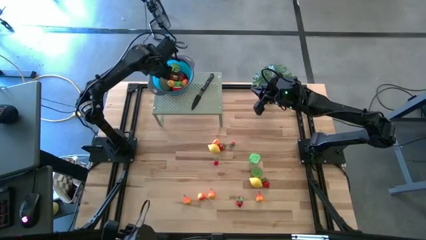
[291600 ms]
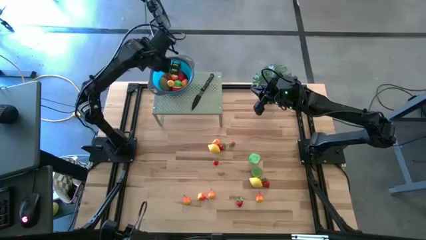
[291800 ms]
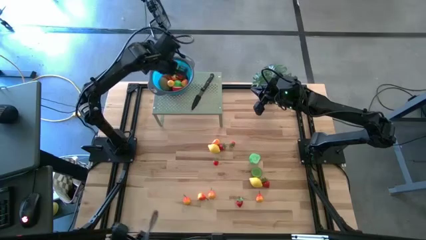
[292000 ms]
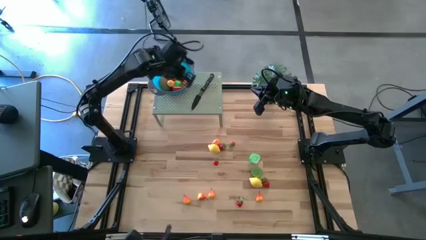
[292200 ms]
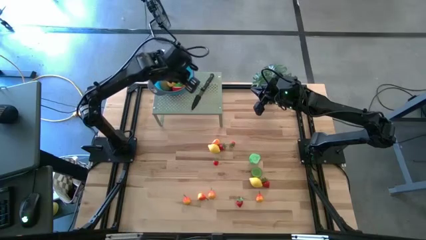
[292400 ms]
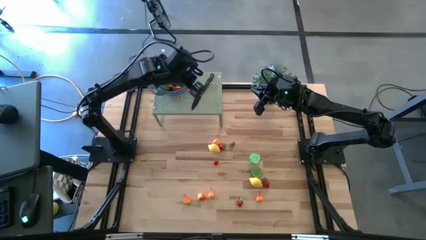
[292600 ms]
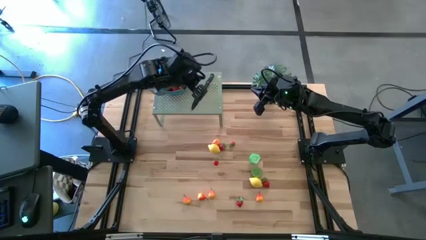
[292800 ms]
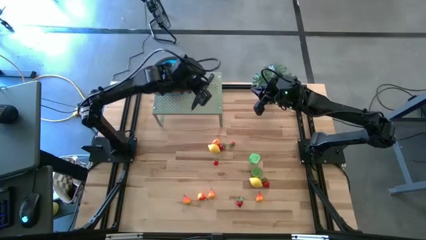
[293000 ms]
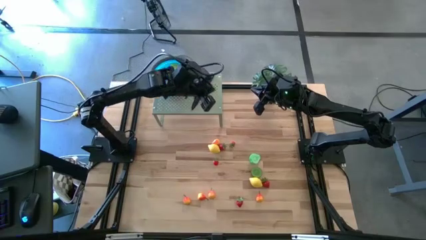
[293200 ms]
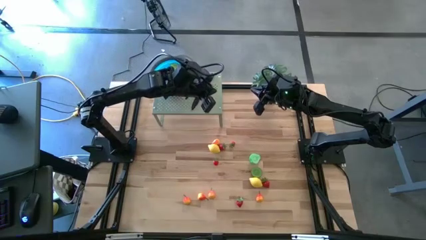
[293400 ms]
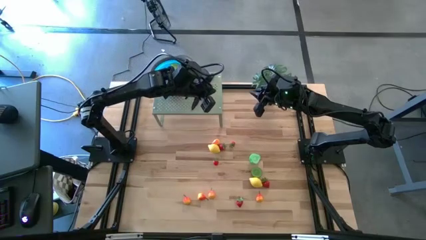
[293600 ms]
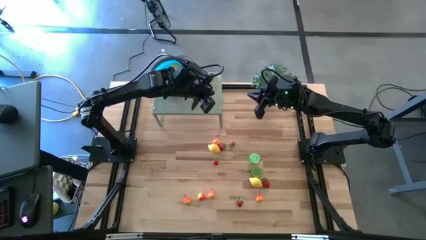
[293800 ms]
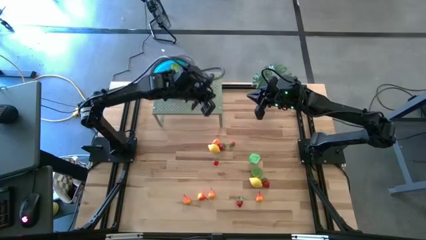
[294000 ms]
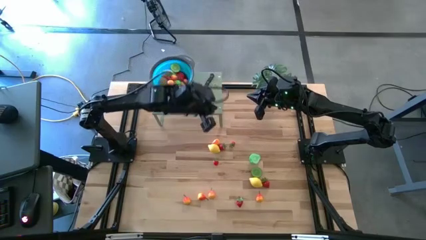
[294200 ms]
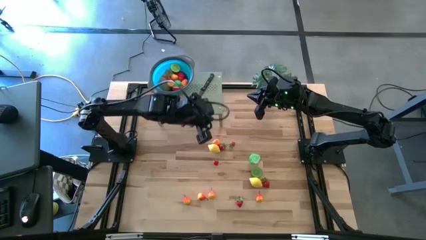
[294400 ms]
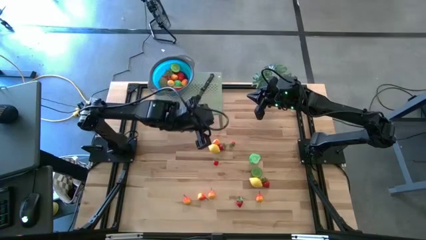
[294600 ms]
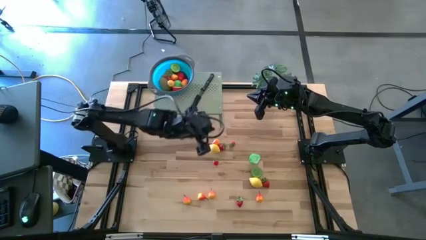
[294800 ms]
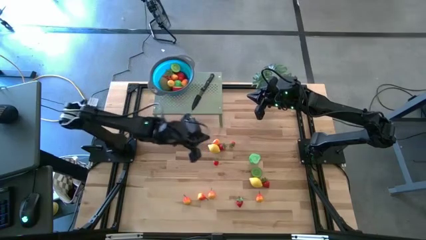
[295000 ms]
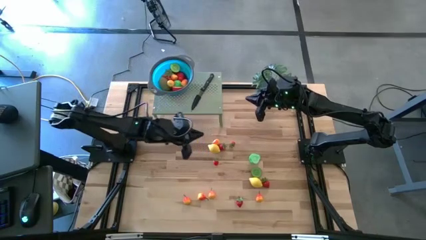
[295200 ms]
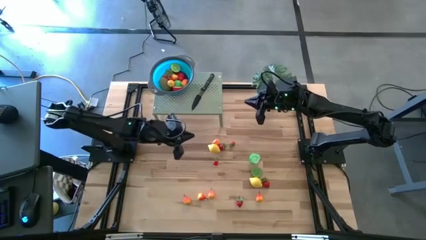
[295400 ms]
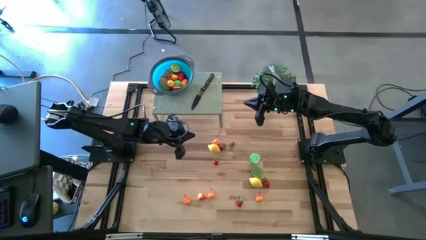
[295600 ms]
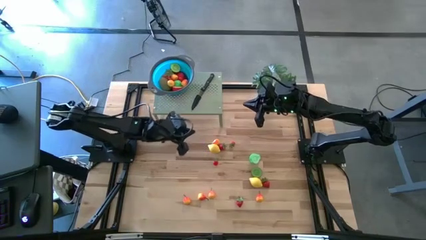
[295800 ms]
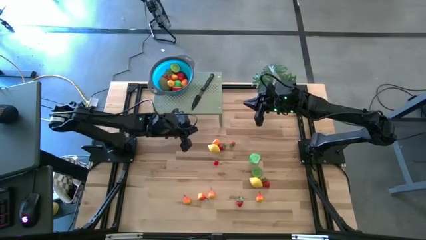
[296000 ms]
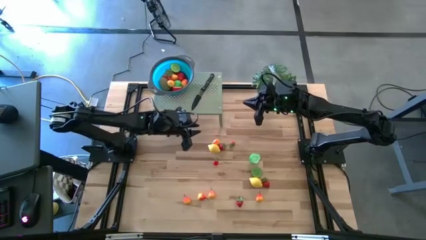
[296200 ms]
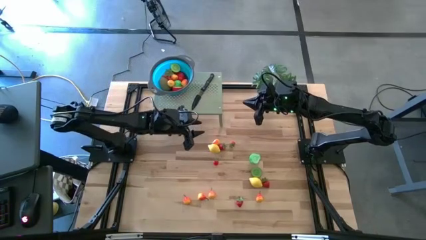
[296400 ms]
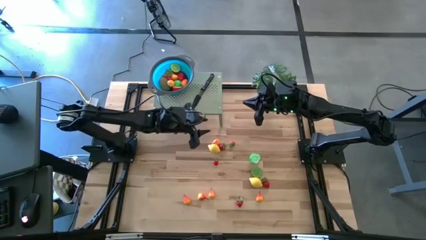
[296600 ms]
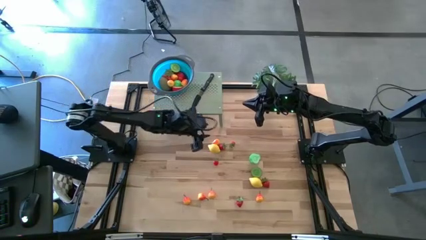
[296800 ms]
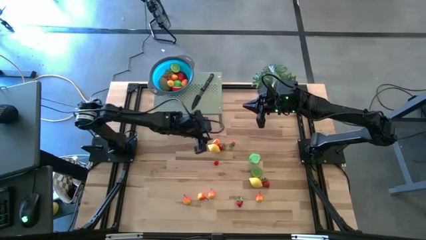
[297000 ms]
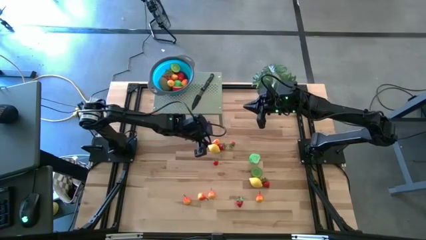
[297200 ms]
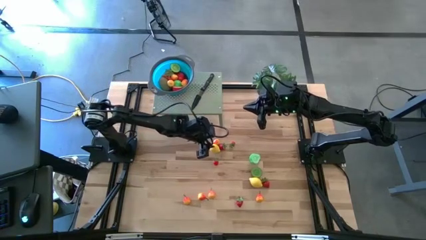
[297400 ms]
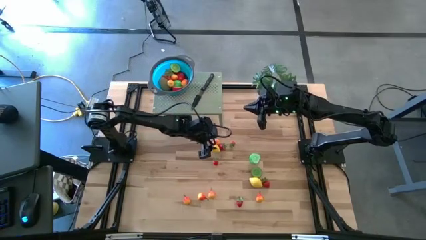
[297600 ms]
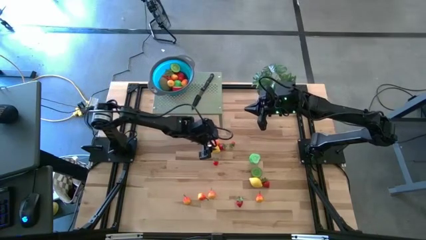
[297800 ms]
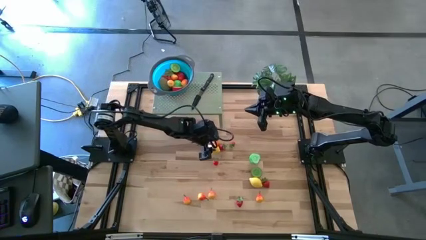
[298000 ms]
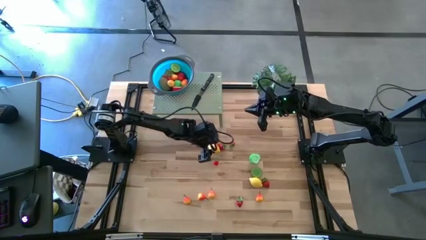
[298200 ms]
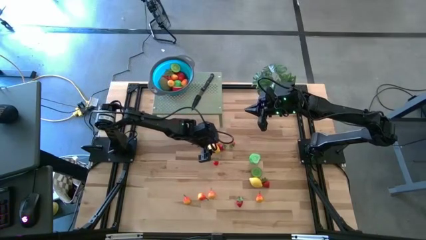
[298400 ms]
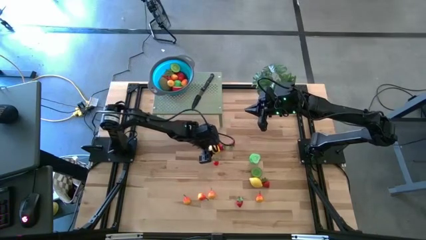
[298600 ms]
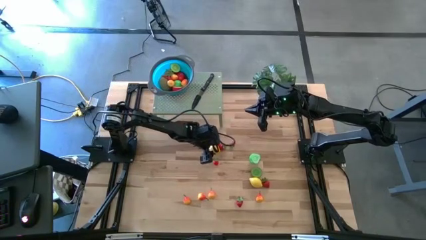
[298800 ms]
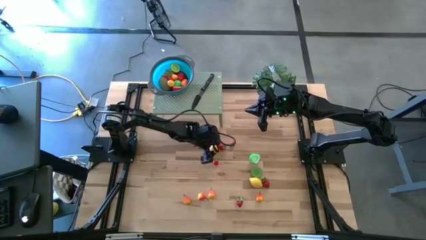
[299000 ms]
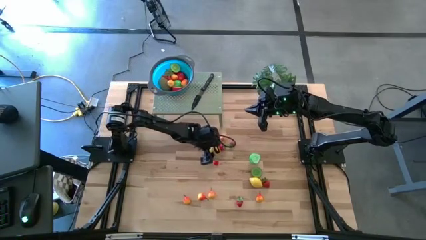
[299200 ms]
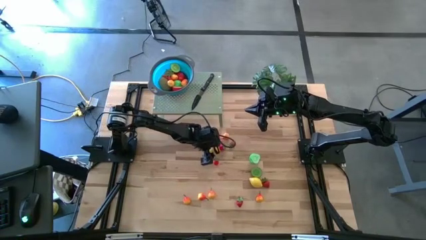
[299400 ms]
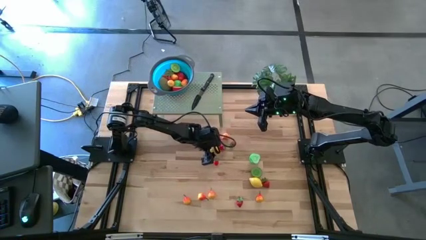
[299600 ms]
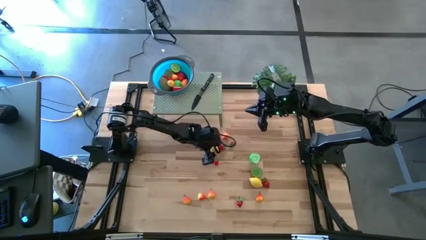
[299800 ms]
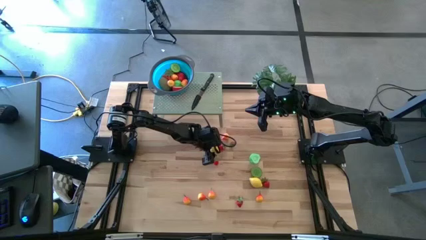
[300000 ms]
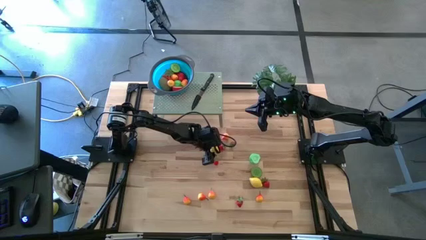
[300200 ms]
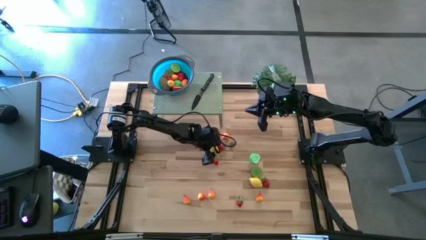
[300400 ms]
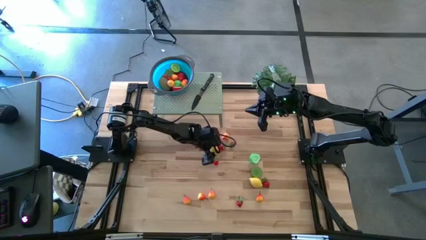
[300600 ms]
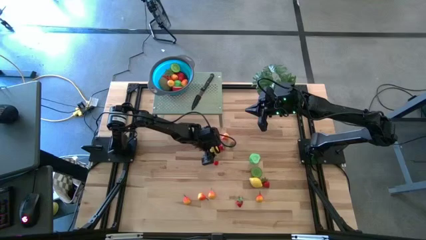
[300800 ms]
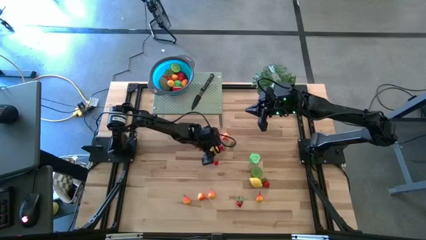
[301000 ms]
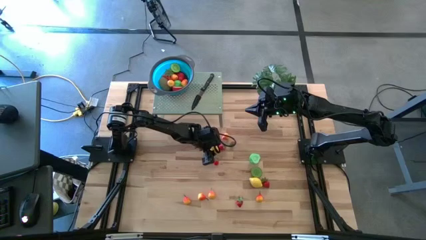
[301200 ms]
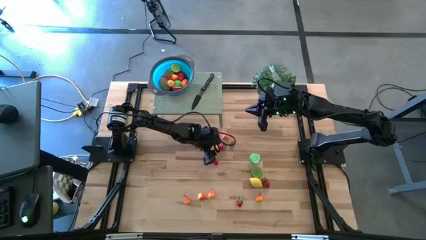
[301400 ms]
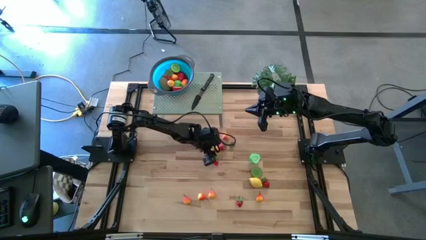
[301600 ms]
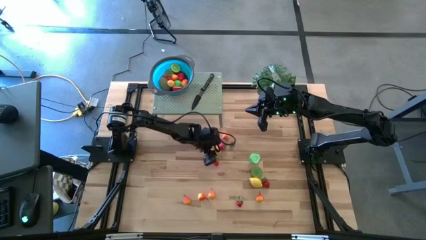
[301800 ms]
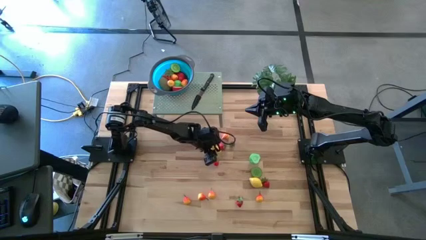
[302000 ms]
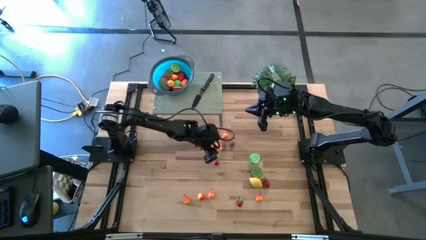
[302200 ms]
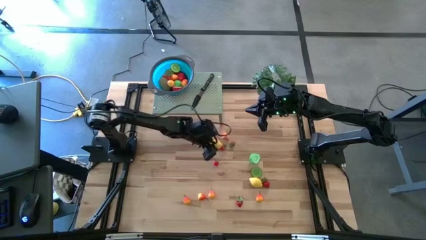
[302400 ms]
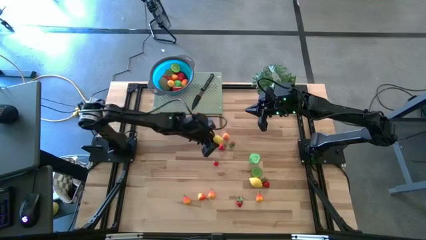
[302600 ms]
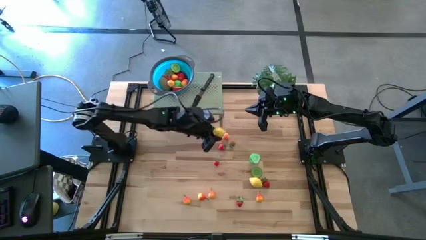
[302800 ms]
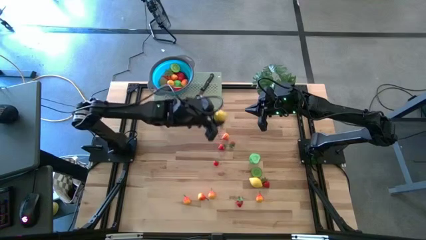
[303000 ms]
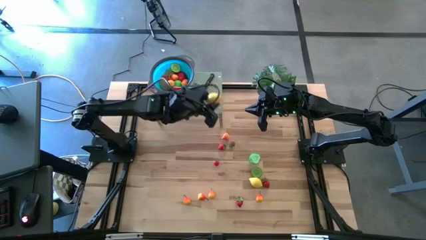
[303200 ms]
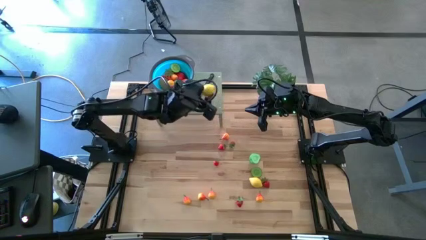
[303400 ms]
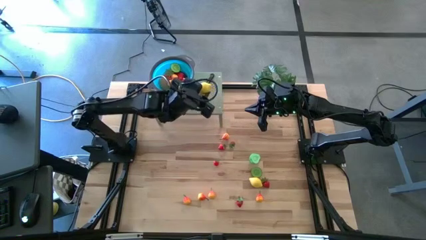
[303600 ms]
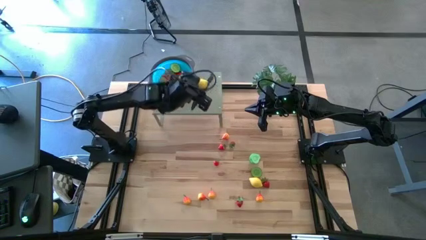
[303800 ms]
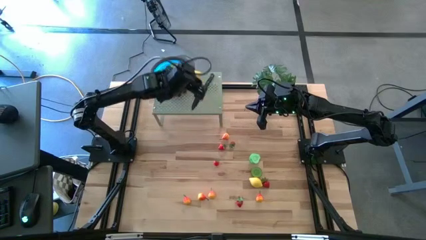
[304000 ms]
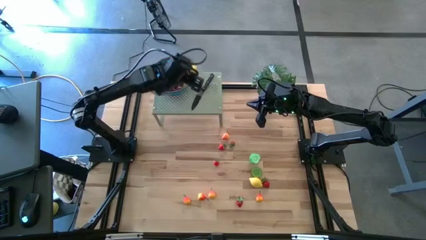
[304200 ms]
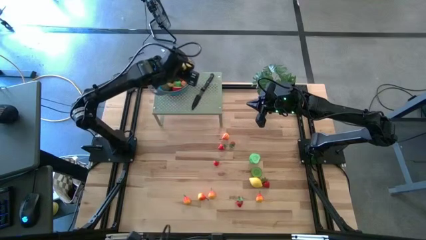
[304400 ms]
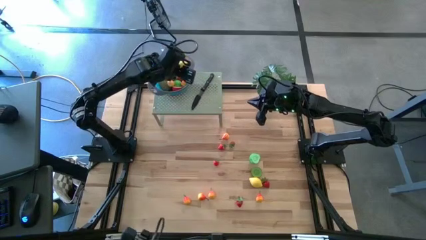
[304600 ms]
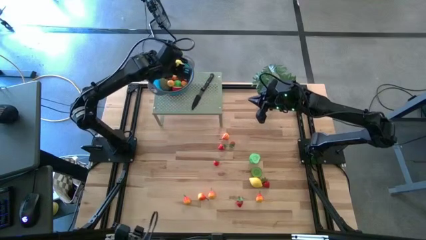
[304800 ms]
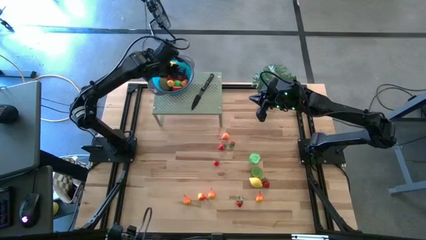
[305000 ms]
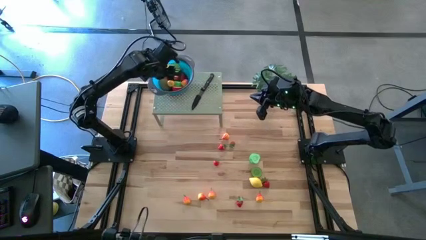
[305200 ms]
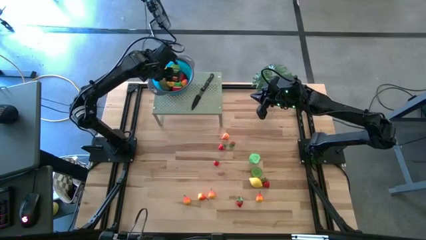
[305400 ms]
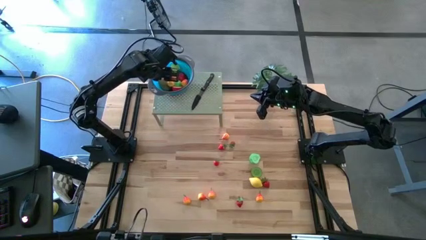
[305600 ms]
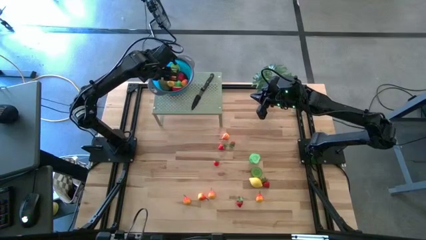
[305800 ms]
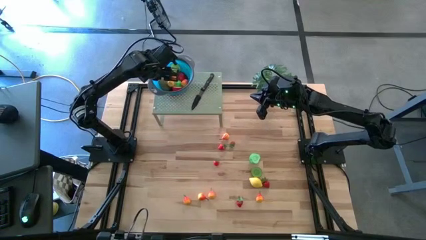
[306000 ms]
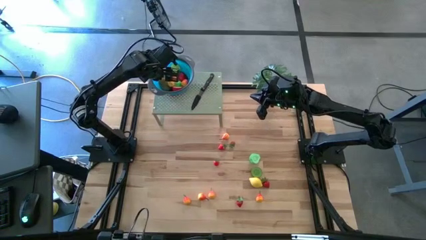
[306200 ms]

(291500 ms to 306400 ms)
Task: Pick & Place Fruit
Put the lemon into the strainer bowl on the shelf
